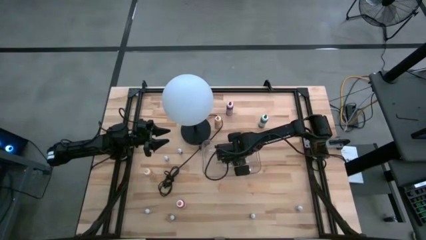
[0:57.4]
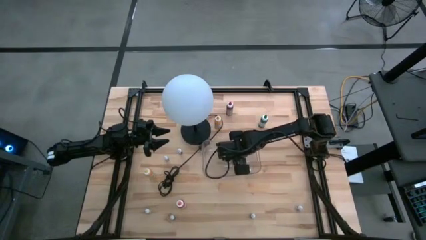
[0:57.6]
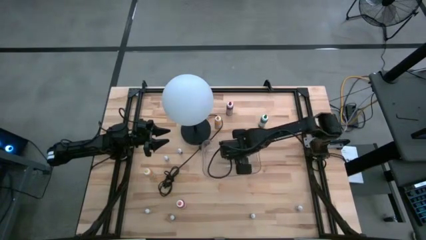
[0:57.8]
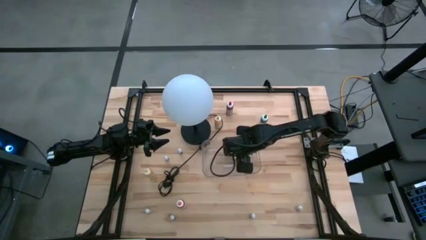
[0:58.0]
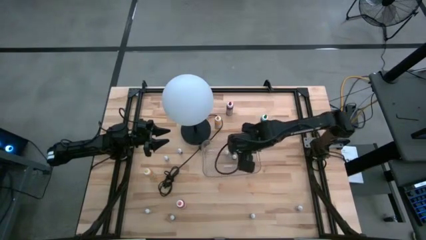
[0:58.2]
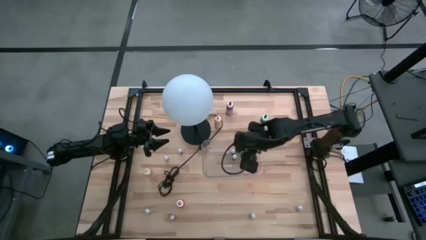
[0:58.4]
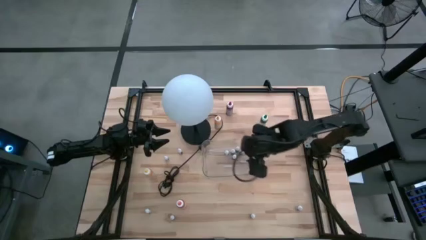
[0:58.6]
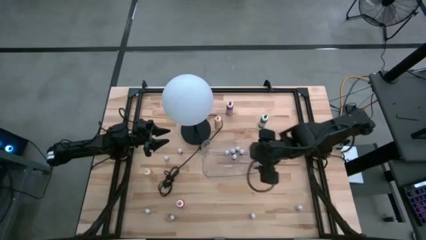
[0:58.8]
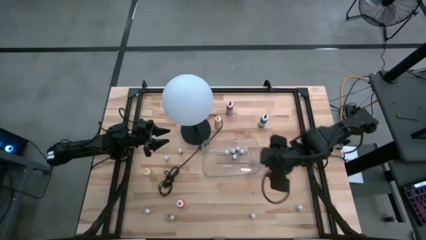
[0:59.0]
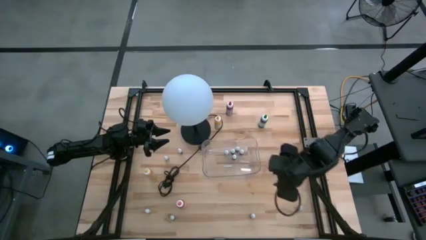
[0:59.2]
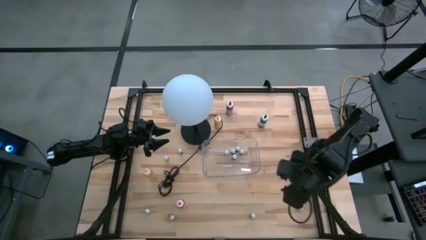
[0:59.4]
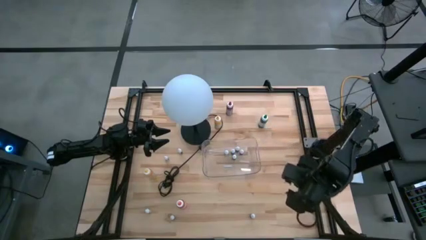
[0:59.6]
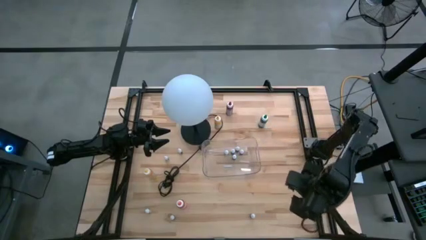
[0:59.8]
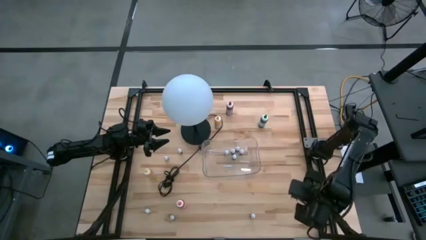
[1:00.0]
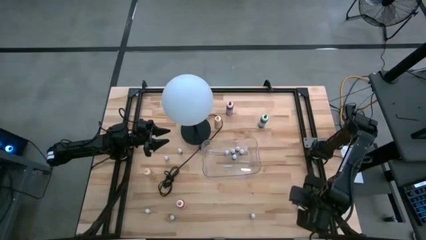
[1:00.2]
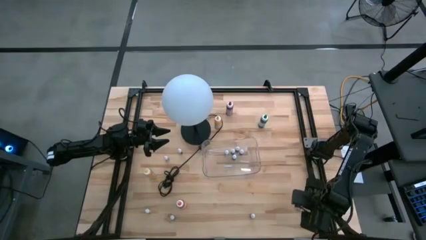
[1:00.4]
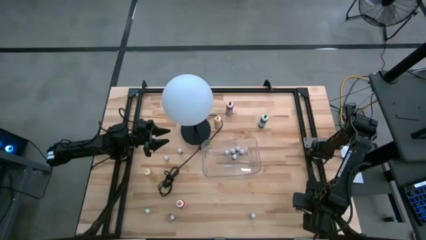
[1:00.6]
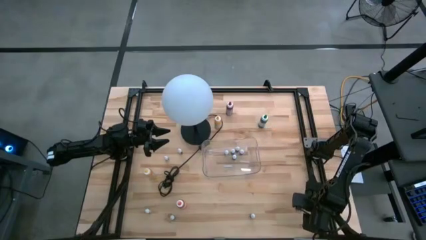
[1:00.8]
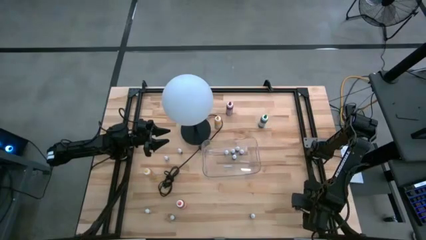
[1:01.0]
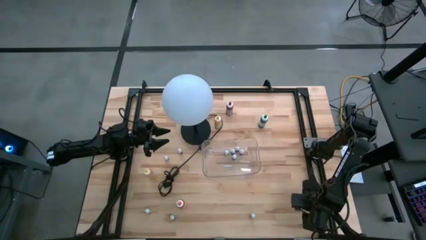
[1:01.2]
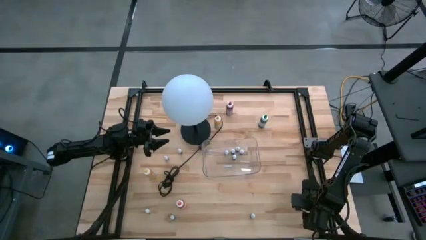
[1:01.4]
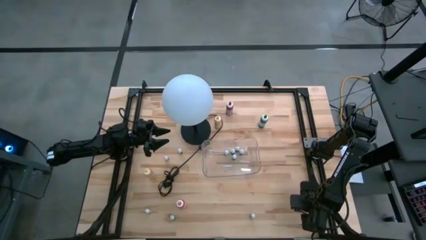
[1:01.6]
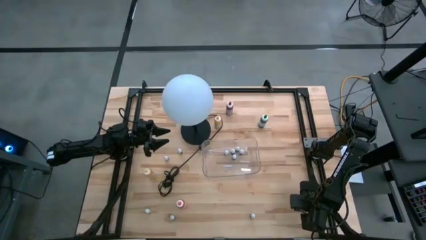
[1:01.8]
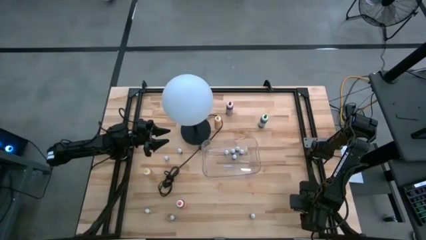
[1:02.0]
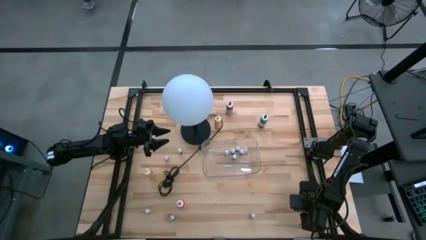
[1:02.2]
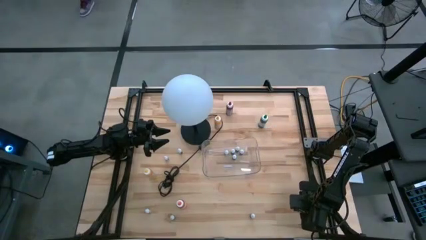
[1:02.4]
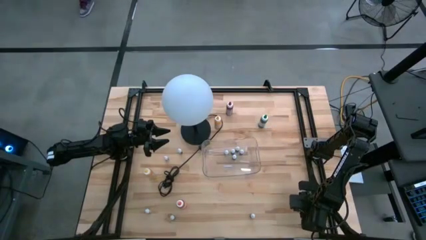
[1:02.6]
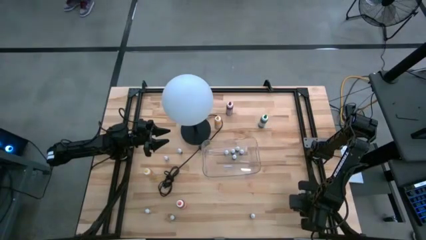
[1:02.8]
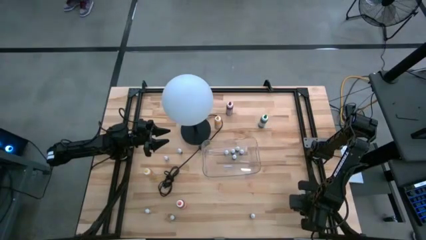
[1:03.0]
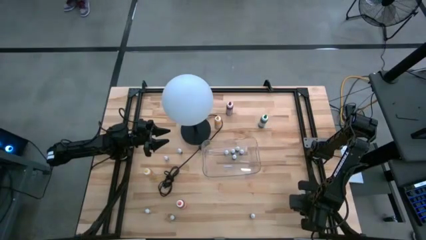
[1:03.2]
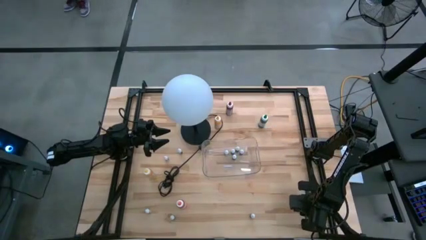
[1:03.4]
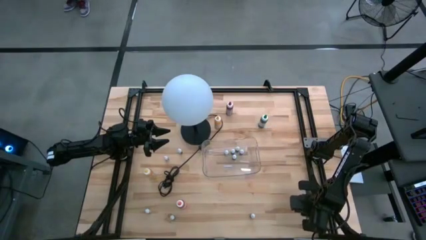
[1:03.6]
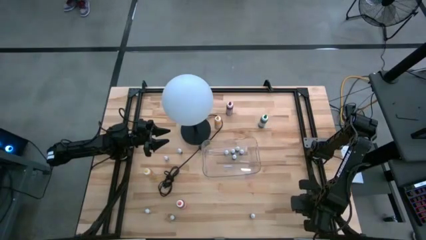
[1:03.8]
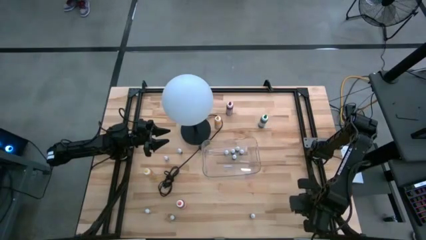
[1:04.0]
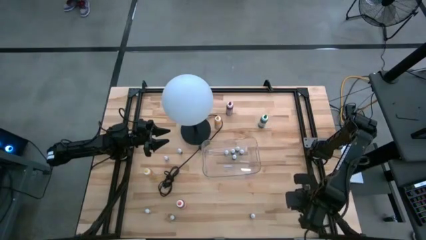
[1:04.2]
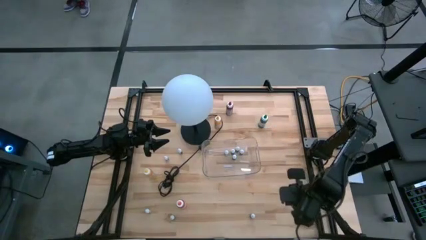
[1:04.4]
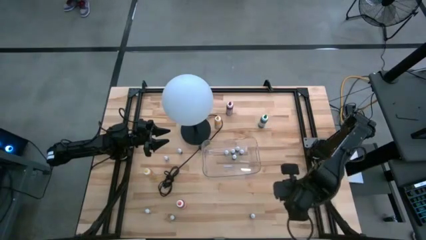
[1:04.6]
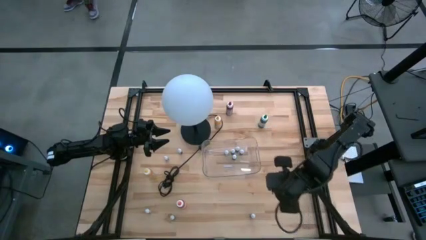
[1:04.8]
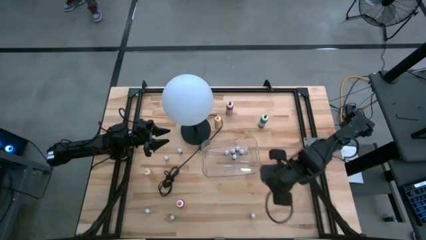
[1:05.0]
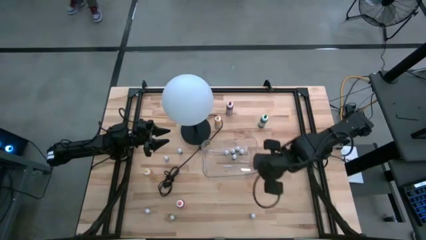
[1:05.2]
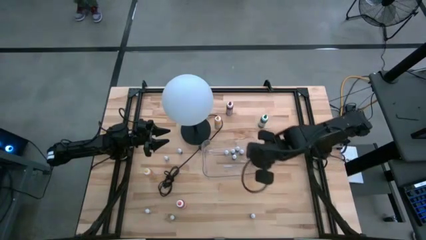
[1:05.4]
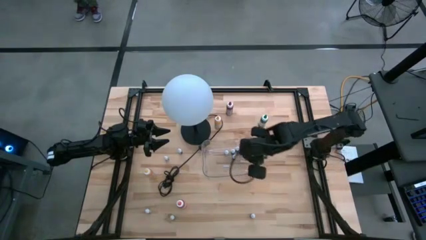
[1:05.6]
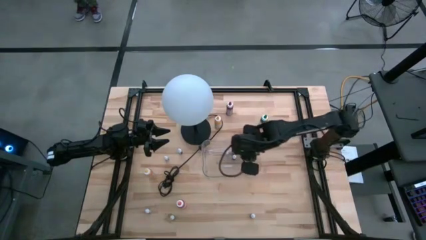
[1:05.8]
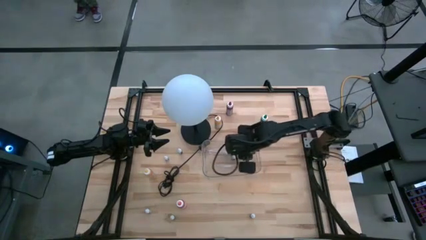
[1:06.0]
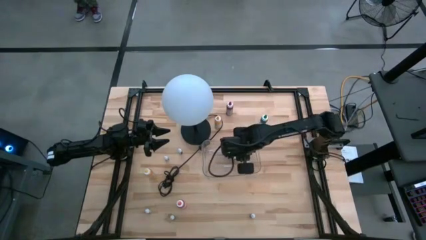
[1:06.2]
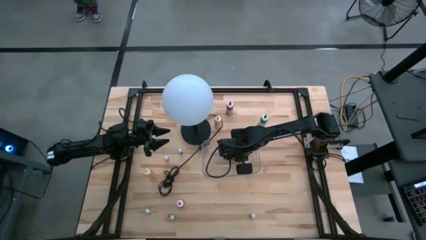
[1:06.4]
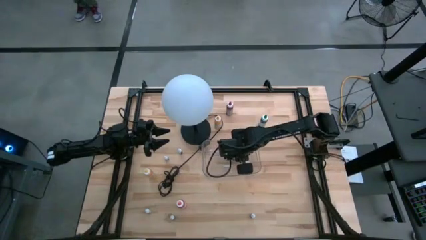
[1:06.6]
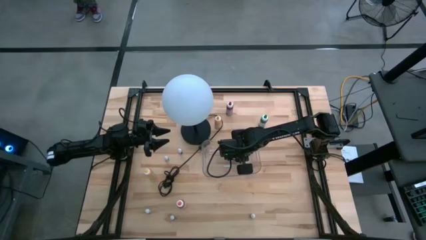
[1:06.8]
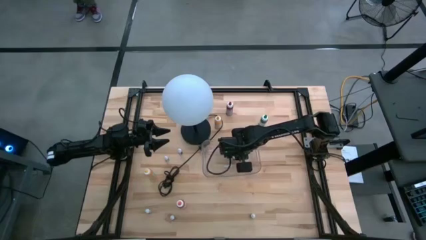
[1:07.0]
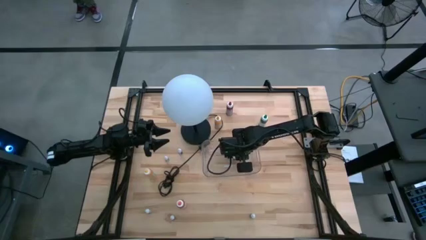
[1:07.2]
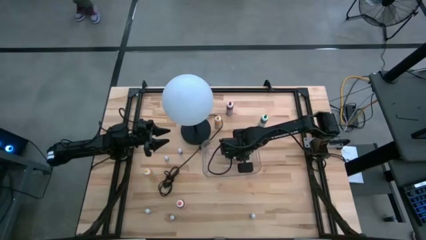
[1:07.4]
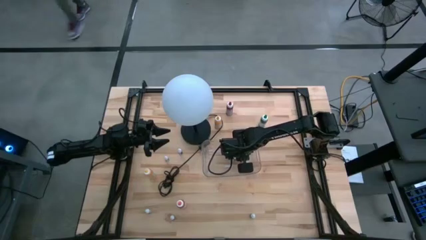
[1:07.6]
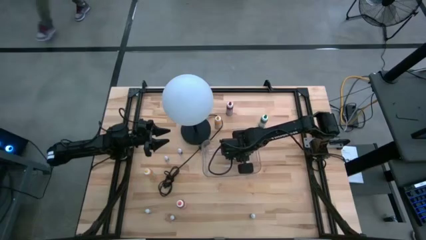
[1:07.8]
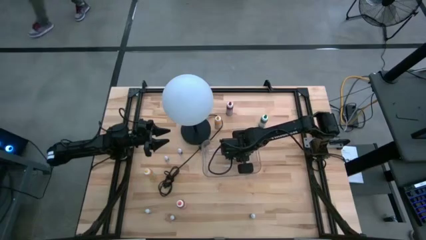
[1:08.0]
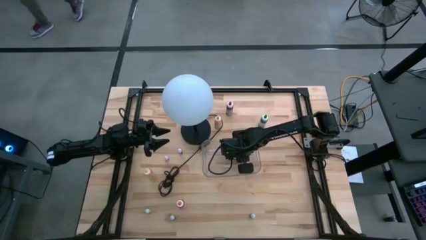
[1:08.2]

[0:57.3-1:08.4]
Task: Pick & Place food coloring
Put the small blue food coloring bottle into the transparent bin
